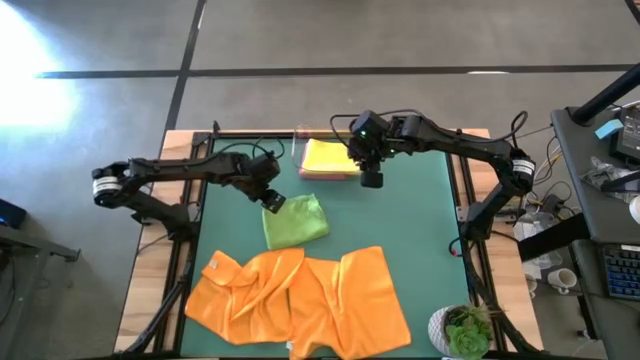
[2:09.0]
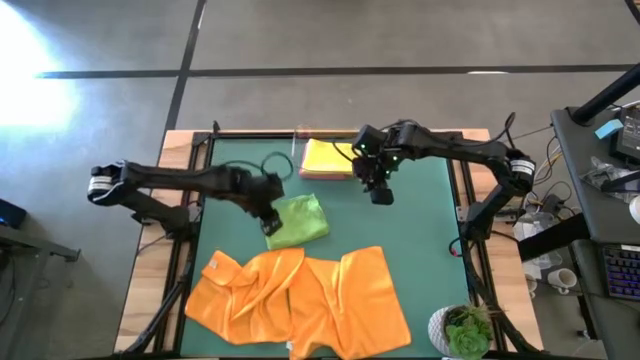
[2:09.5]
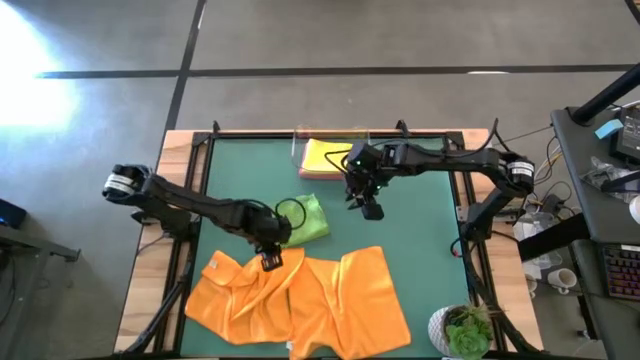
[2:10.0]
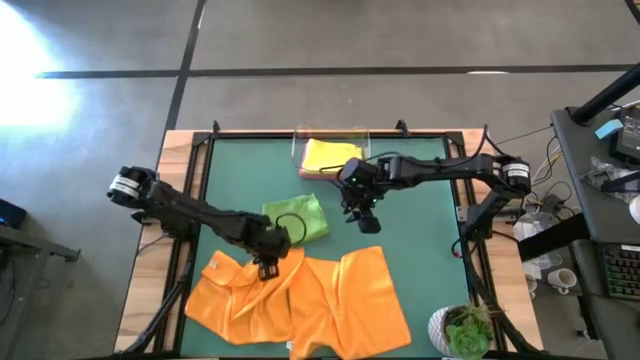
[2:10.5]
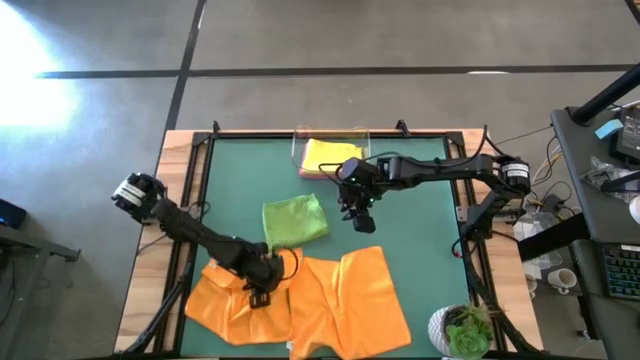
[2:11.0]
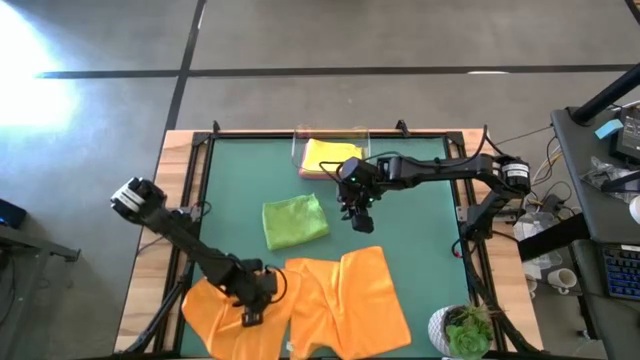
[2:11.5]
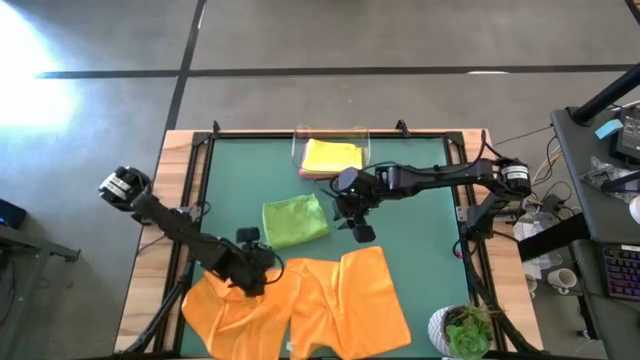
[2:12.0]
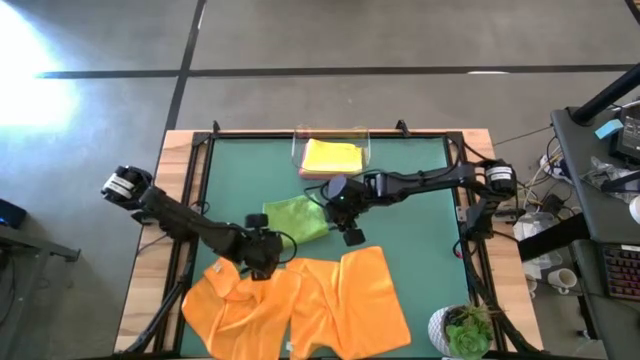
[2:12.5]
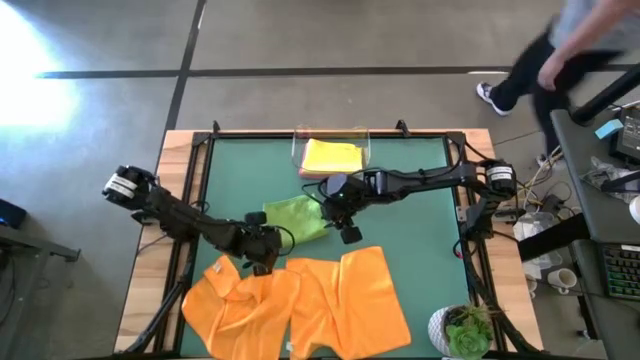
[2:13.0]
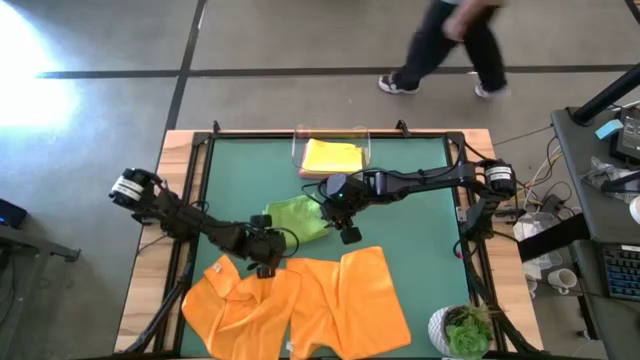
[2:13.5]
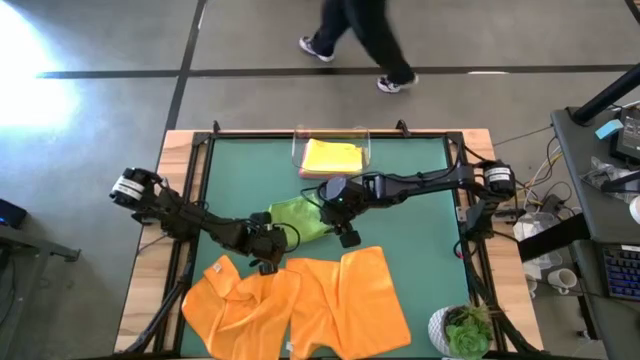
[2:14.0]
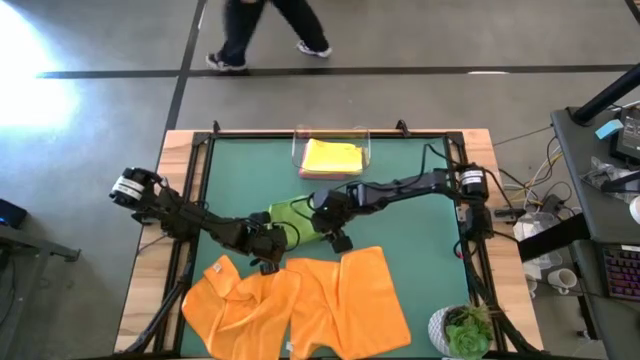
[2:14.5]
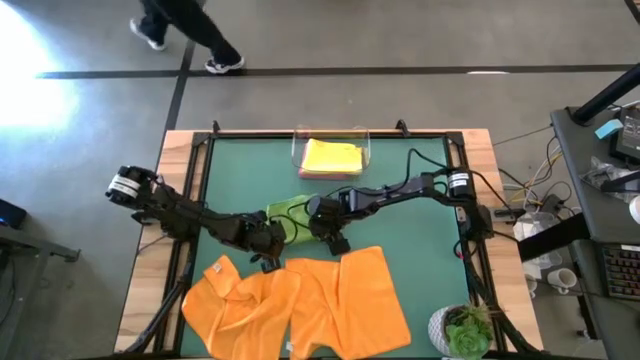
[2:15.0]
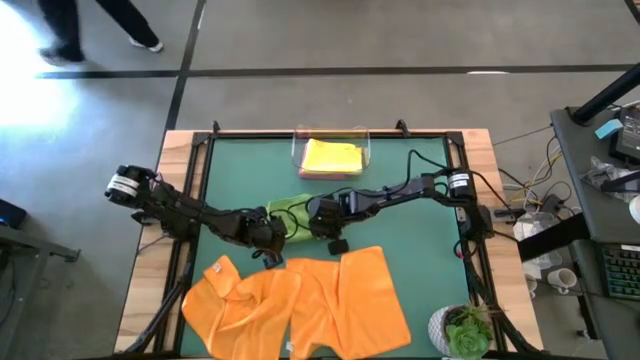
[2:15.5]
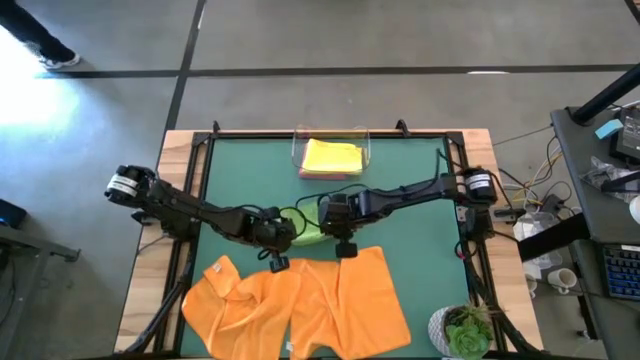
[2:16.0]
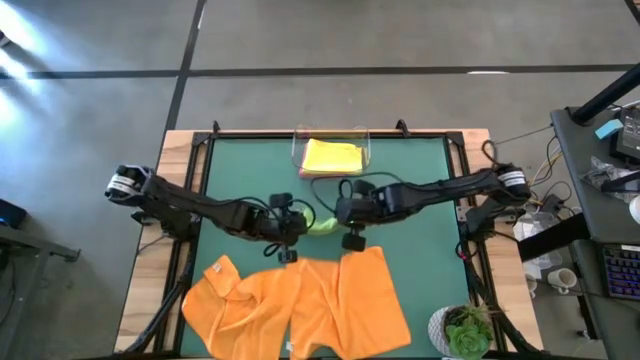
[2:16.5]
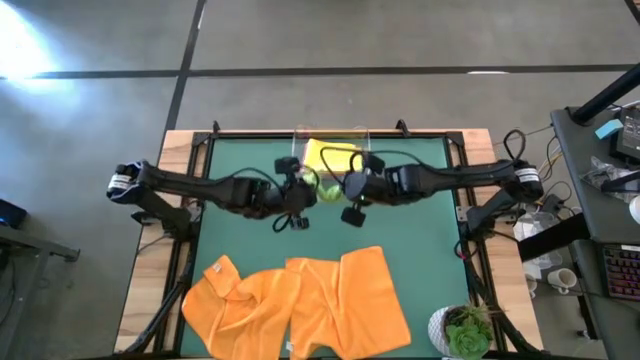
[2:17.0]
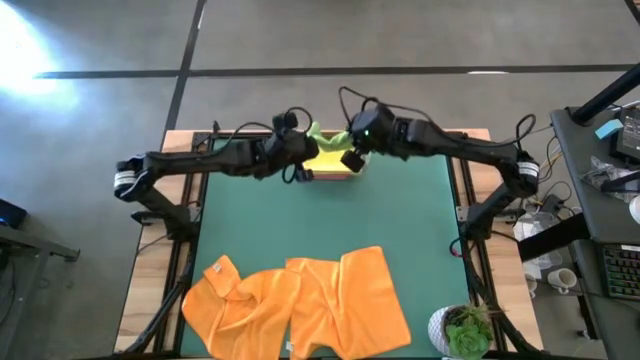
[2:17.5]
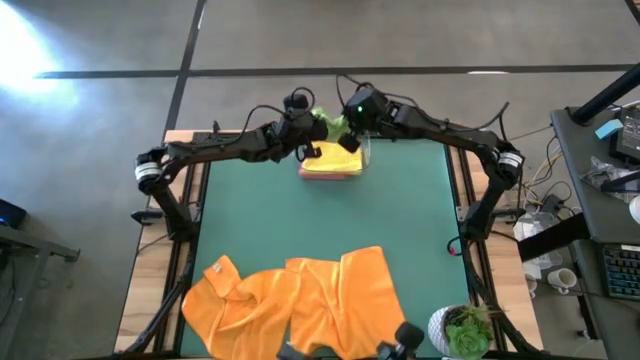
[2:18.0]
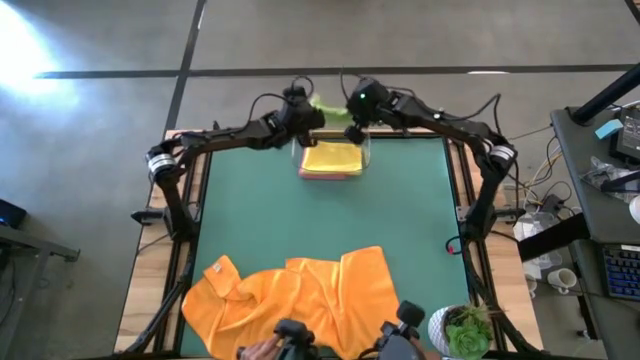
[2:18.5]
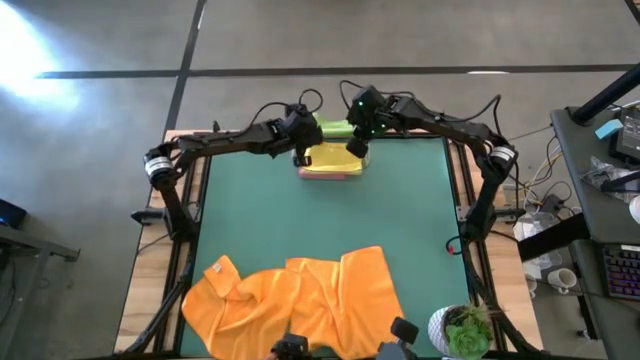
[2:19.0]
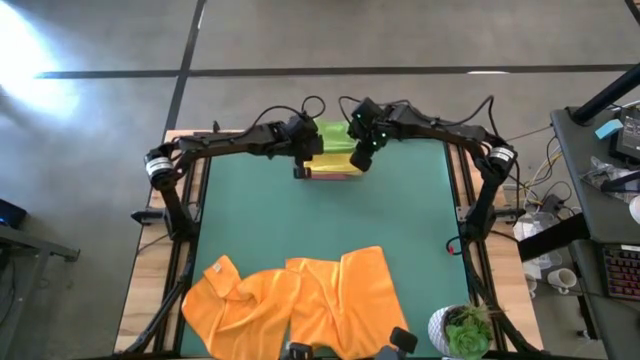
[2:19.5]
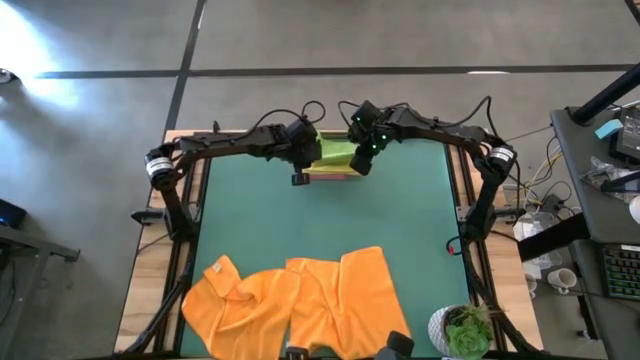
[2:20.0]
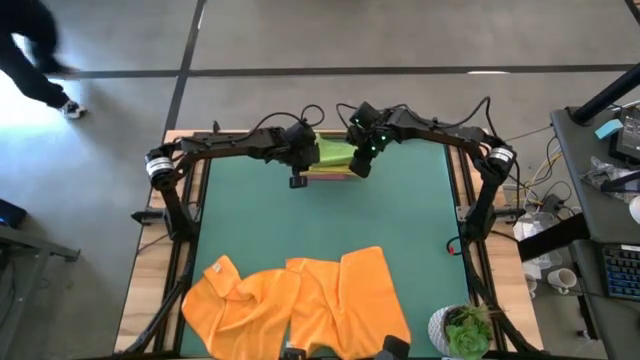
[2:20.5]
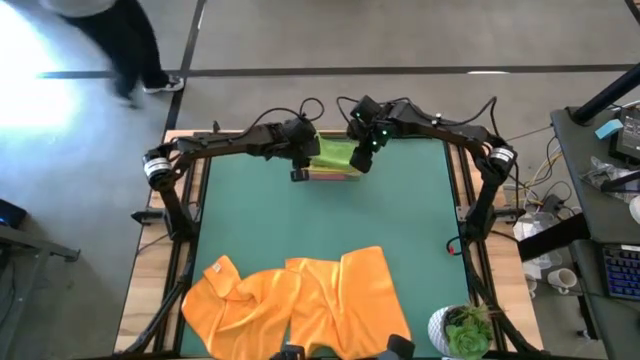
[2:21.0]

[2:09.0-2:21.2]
Task: Fold microfiber towels
Put the green microfiber towel into the transparent bin

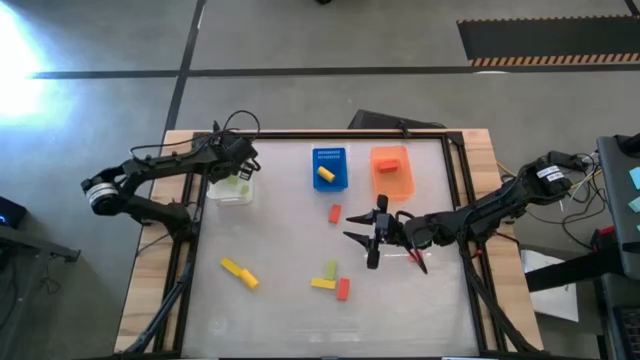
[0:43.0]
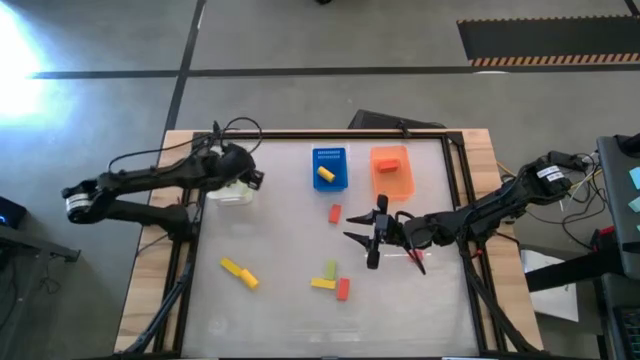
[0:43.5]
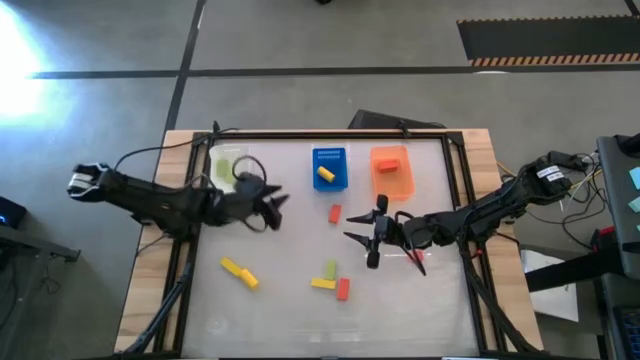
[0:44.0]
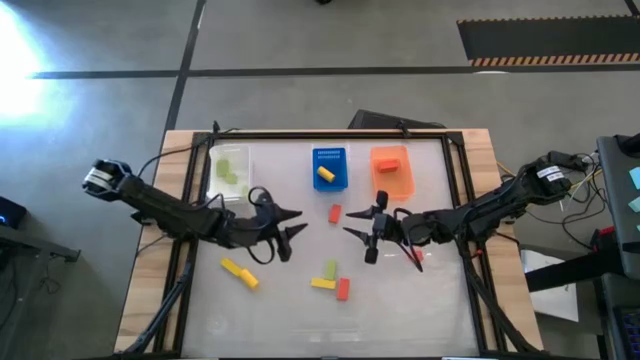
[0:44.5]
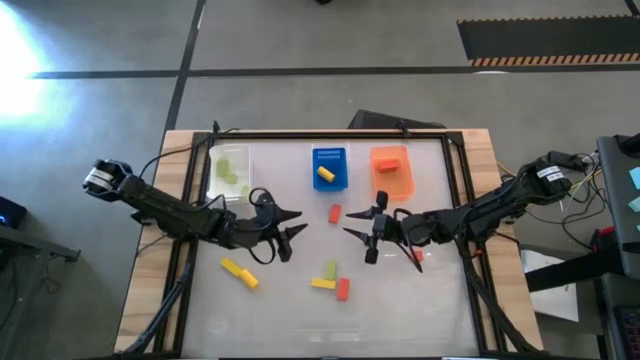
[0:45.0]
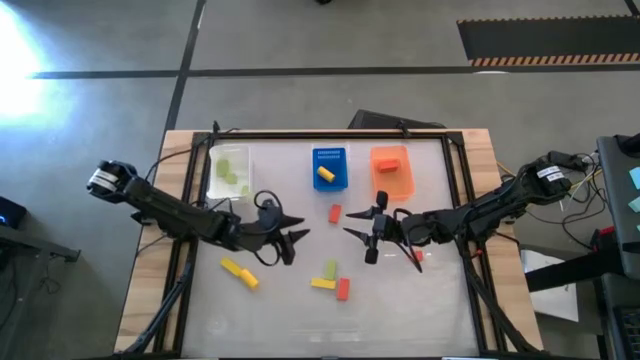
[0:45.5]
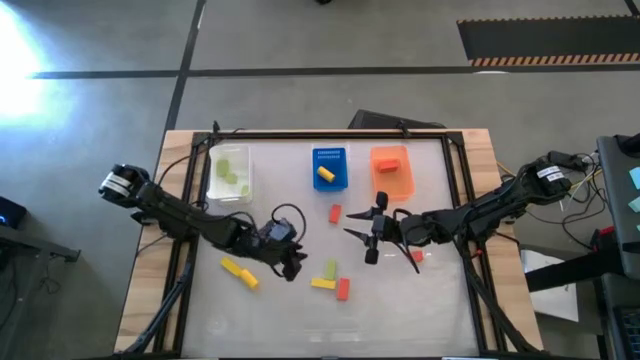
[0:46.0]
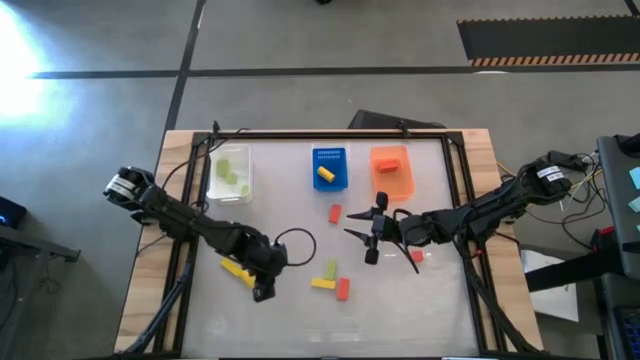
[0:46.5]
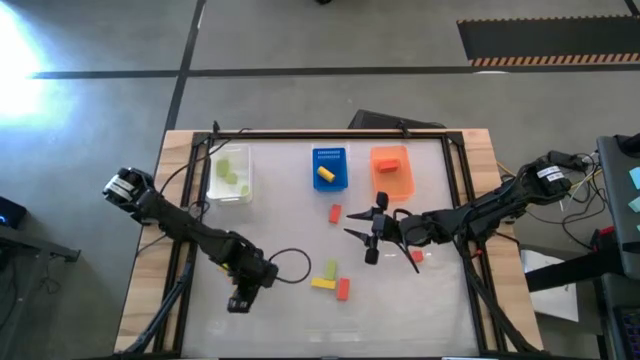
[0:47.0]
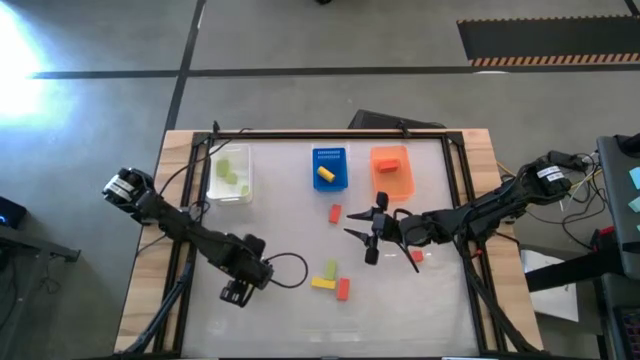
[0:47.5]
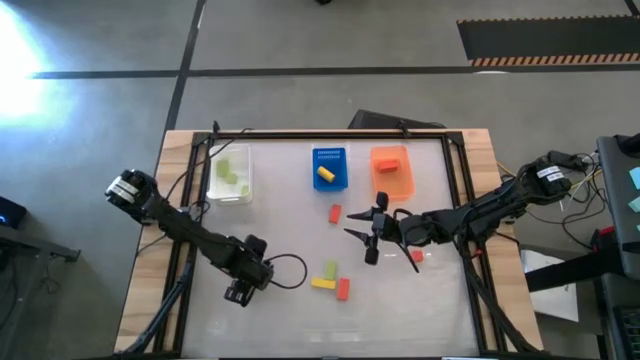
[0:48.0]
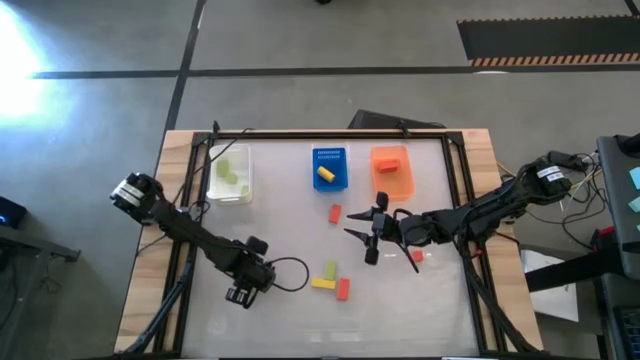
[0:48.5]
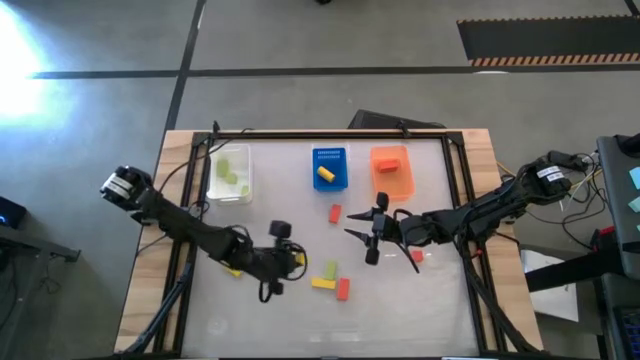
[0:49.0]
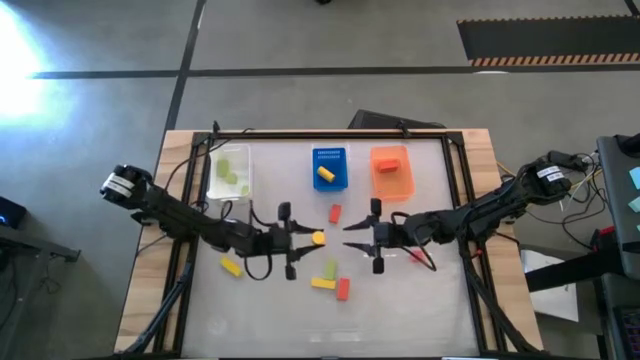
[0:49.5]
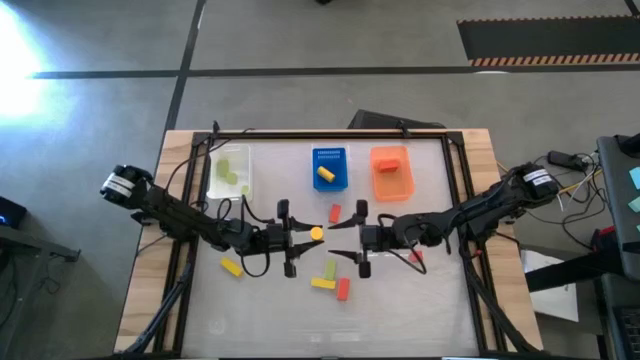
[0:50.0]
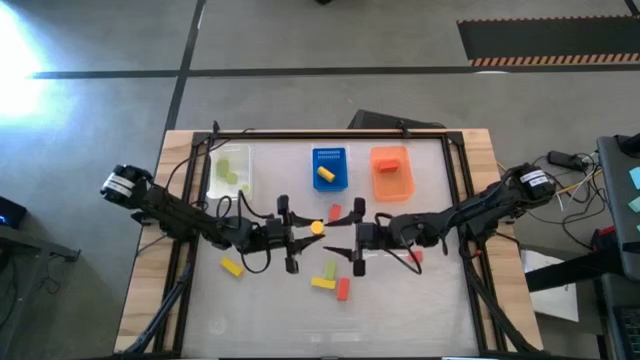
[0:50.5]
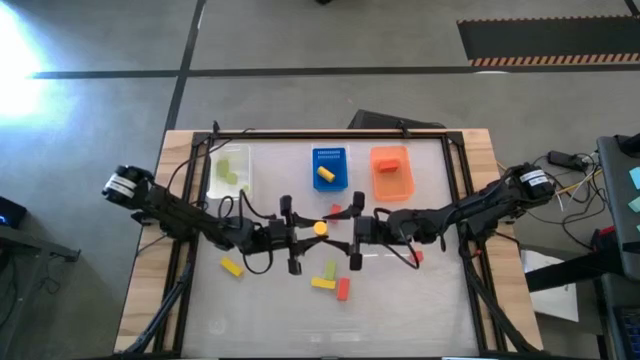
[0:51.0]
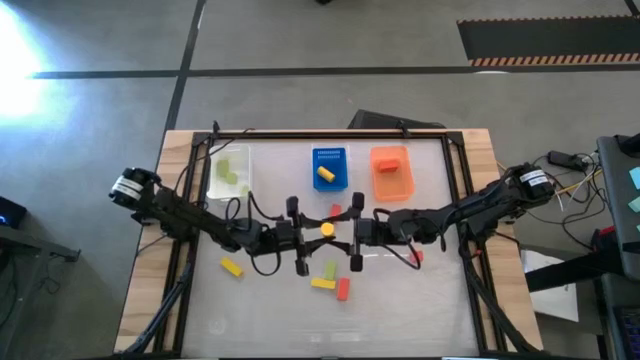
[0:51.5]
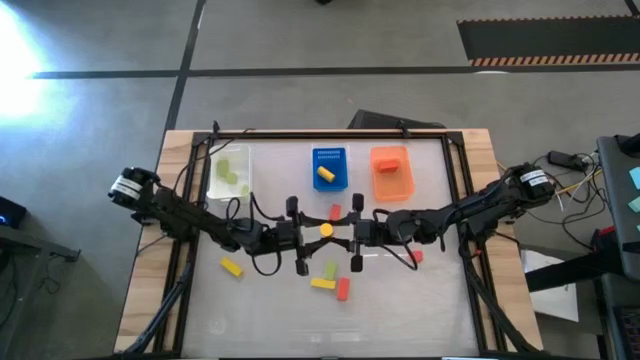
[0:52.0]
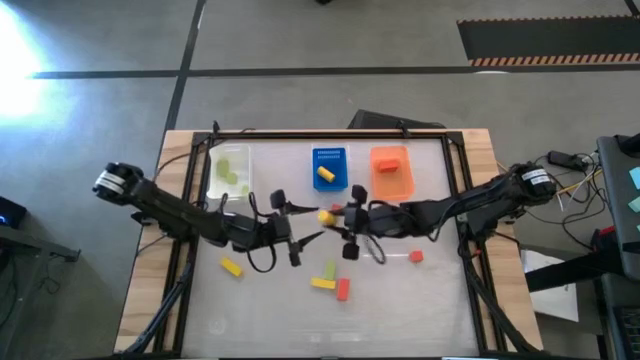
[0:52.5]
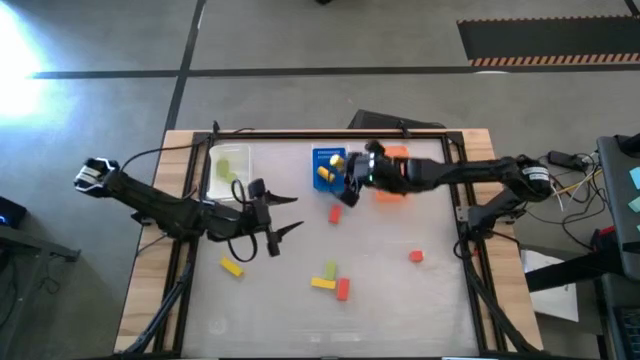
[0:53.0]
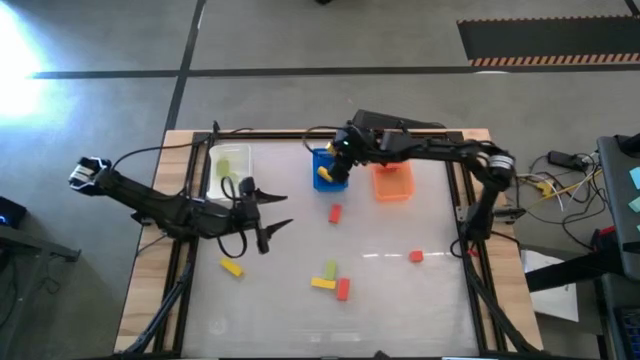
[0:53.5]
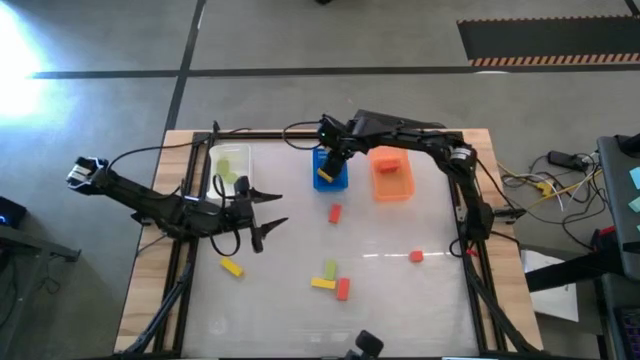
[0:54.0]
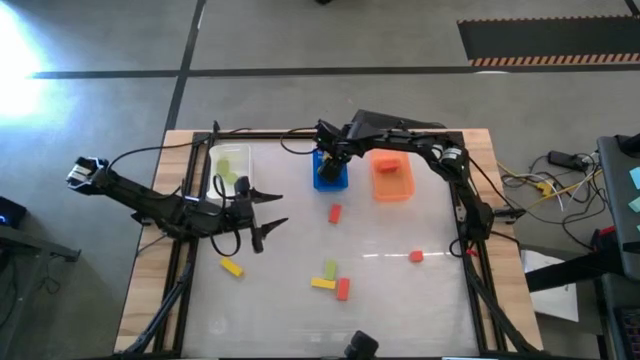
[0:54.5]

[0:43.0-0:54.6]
Task: Sort & place blocks by color
Put the yellow block into the blue bin
